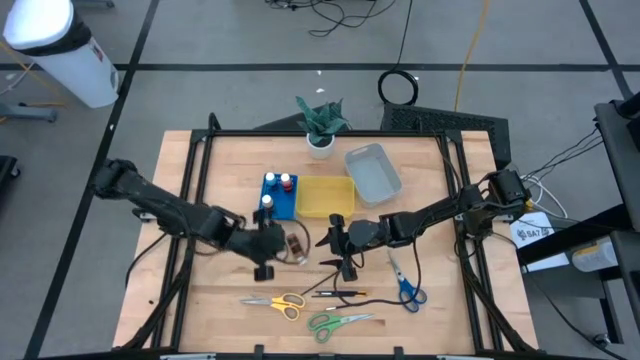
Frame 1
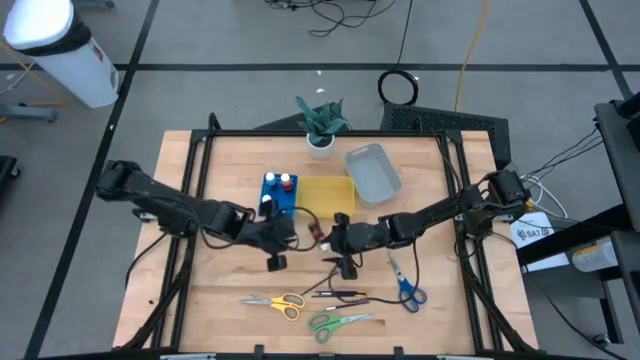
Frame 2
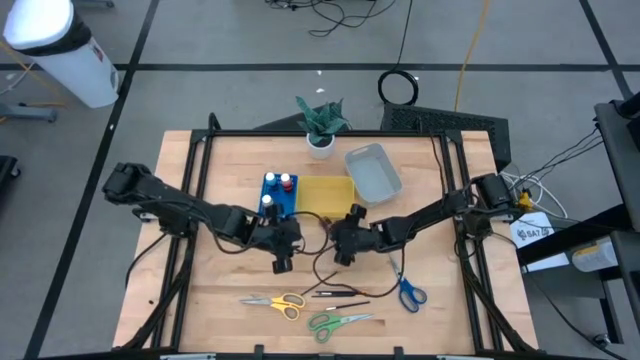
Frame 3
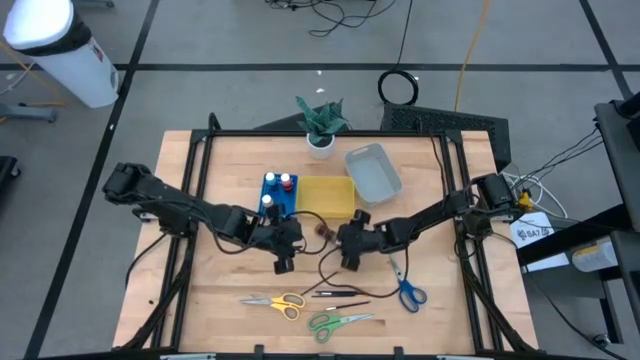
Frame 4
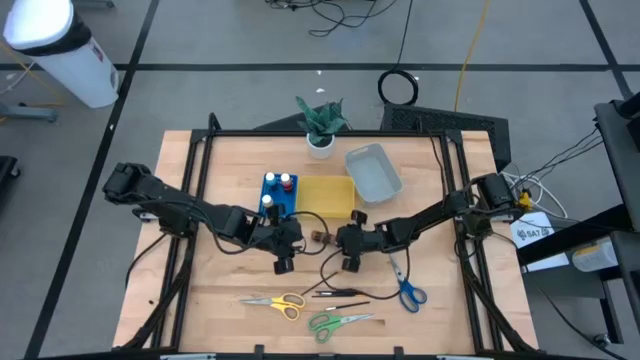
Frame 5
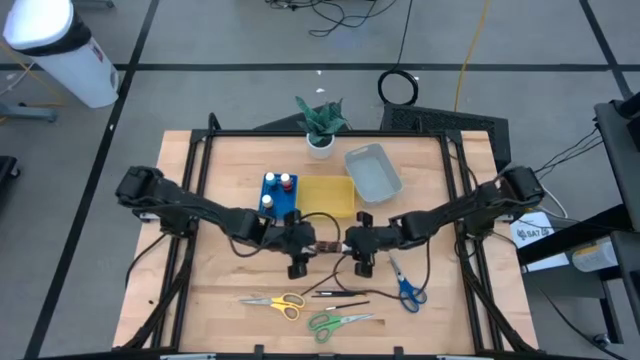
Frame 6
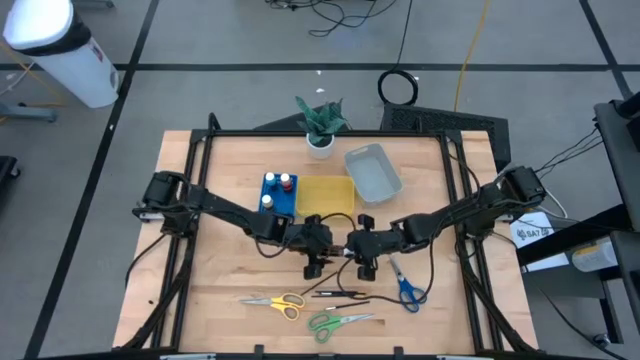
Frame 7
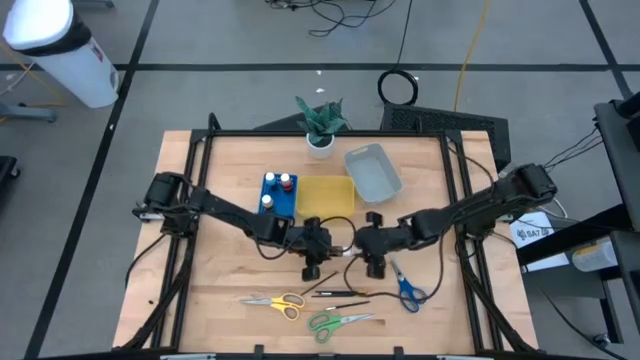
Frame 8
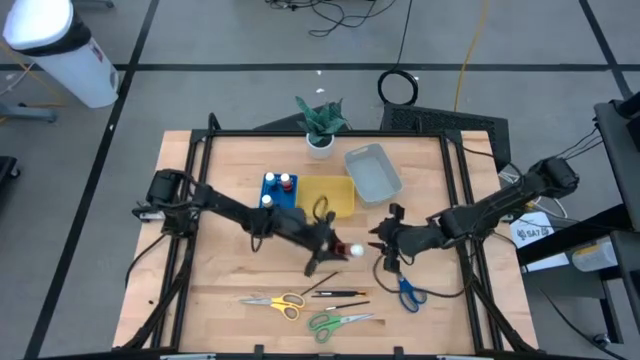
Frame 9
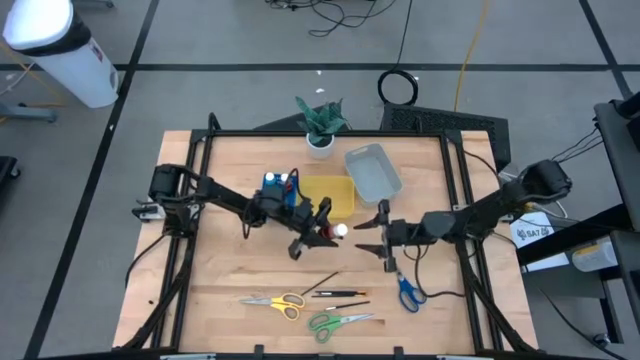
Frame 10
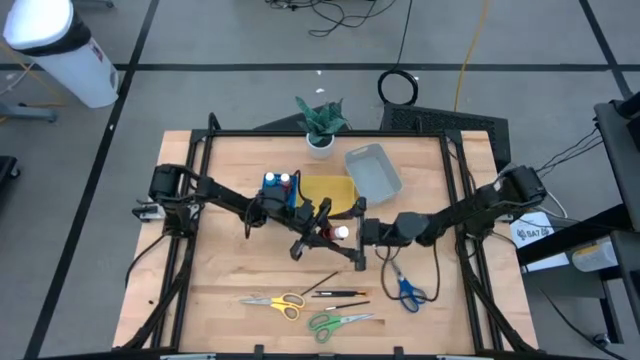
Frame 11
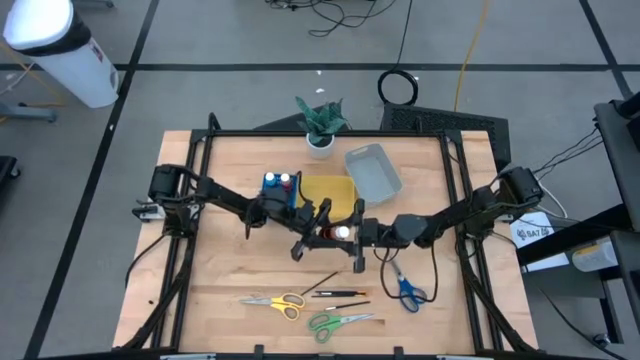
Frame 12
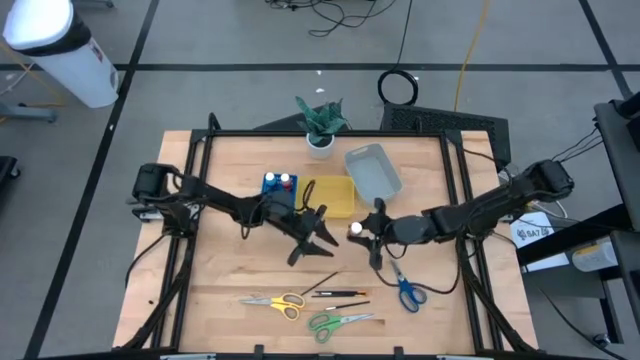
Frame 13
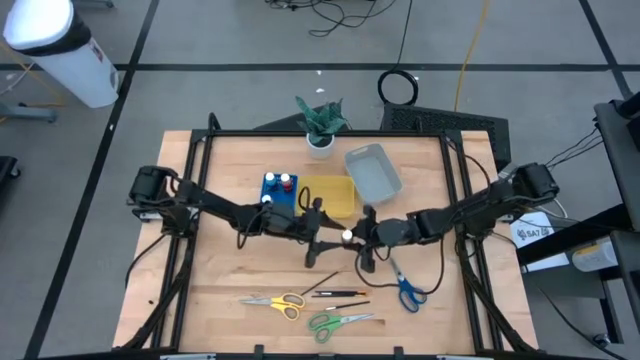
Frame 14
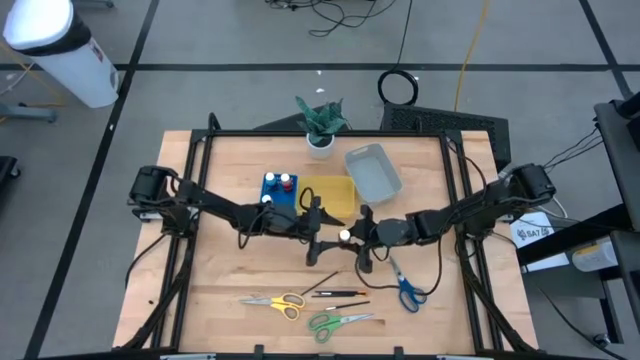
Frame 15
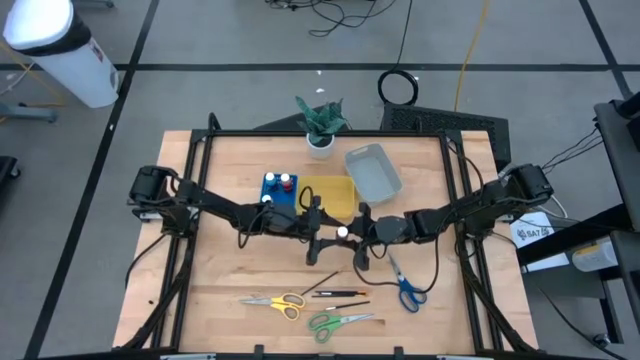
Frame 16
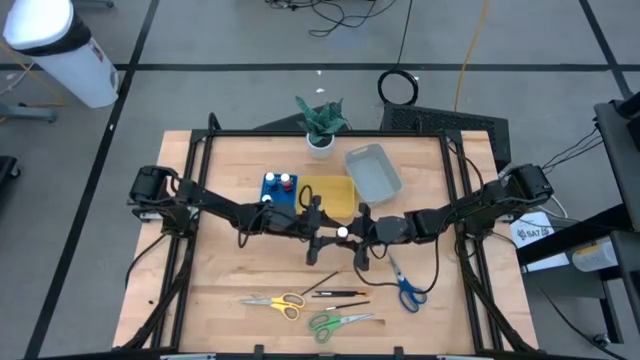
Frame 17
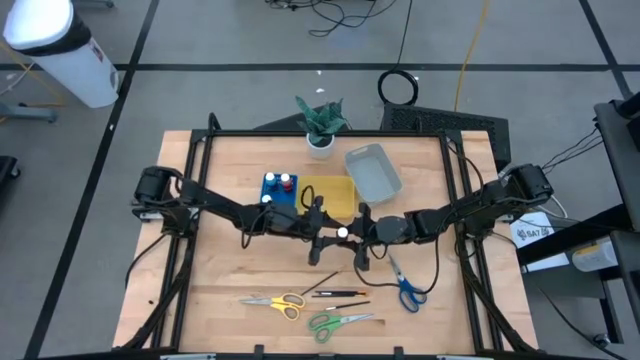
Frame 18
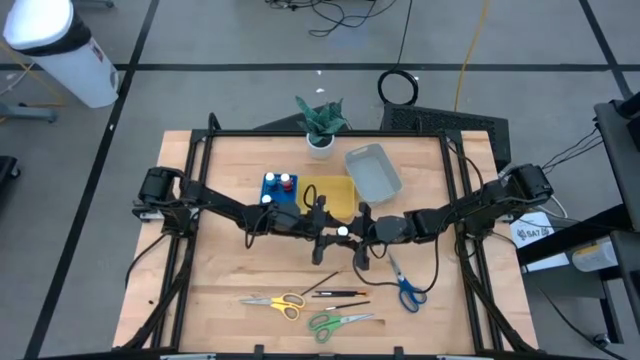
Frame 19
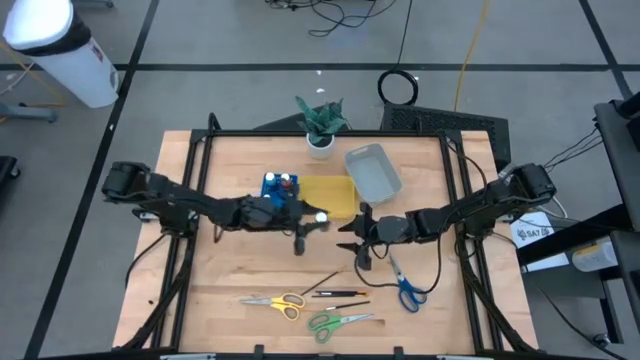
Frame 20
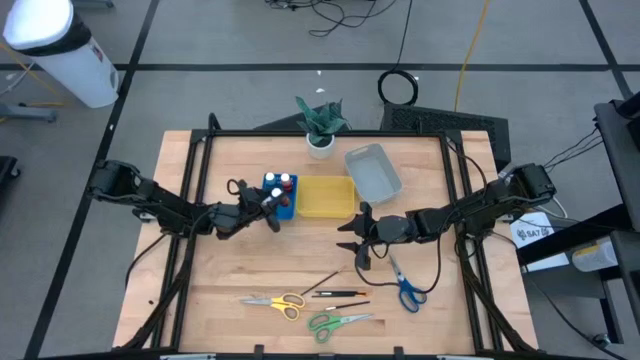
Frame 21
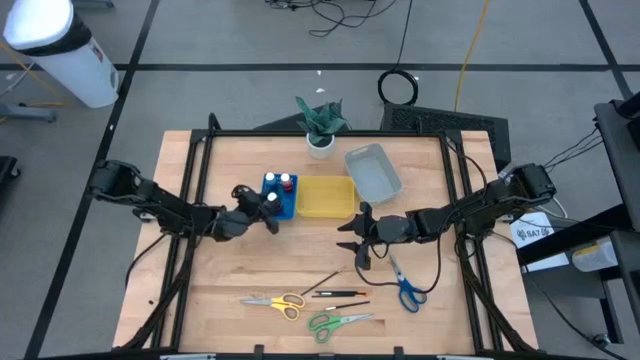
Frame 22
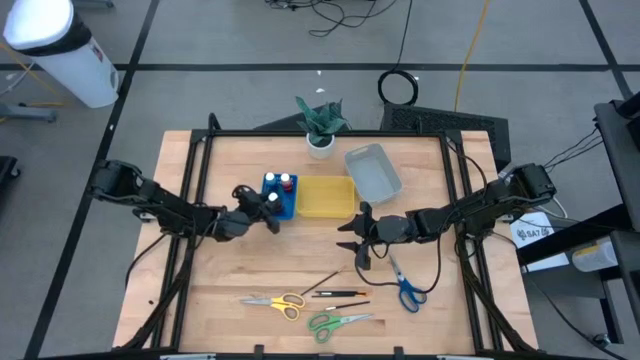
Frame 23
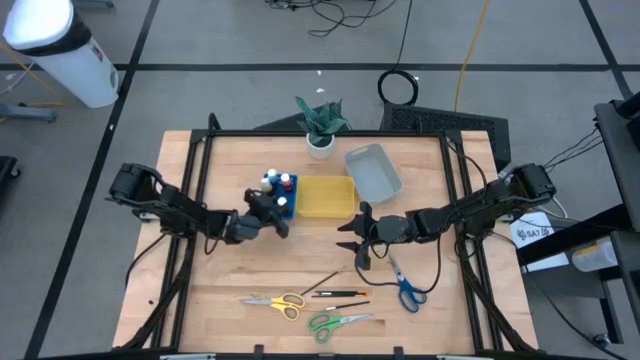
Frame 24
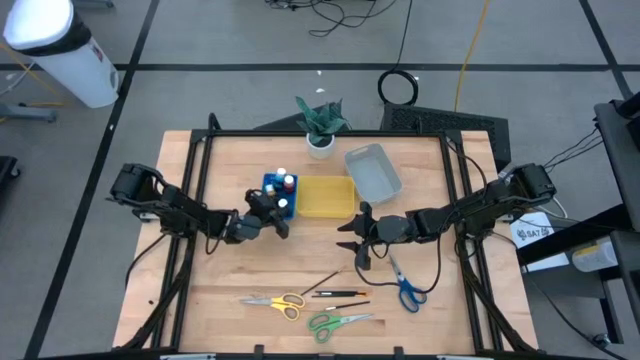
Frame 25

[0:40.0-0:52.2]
Task: Pick & Place Paint Supplies
Put the orange paint bottle into the blue bin

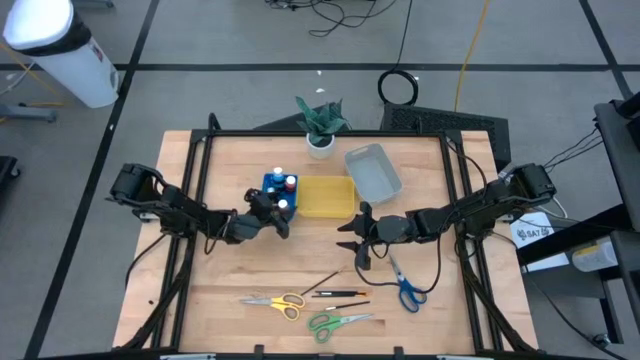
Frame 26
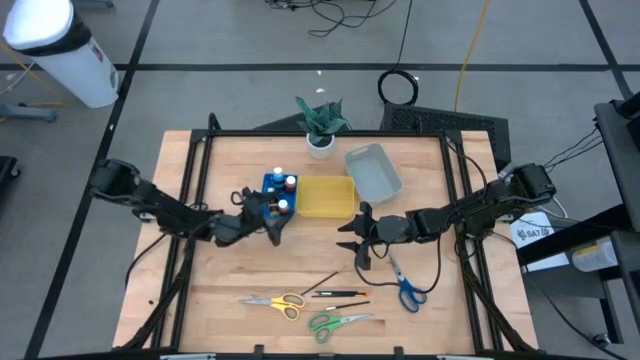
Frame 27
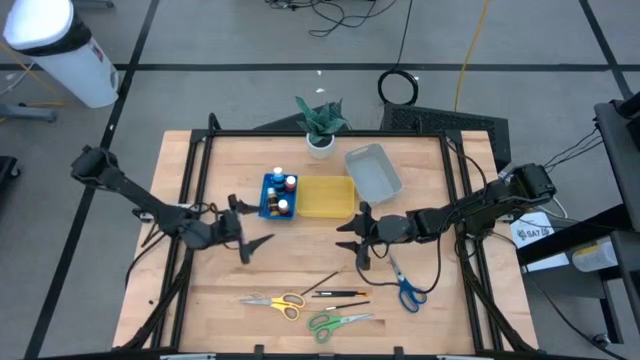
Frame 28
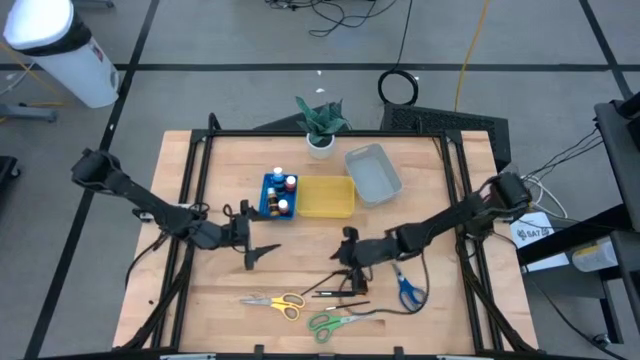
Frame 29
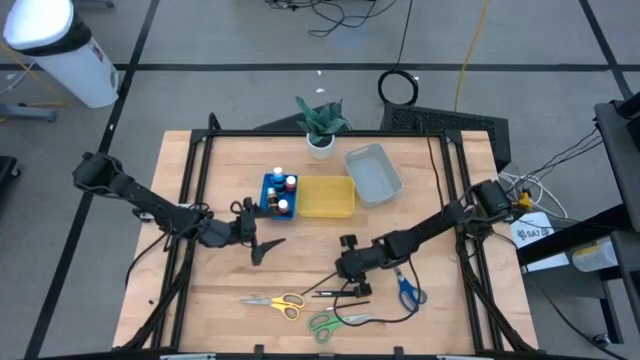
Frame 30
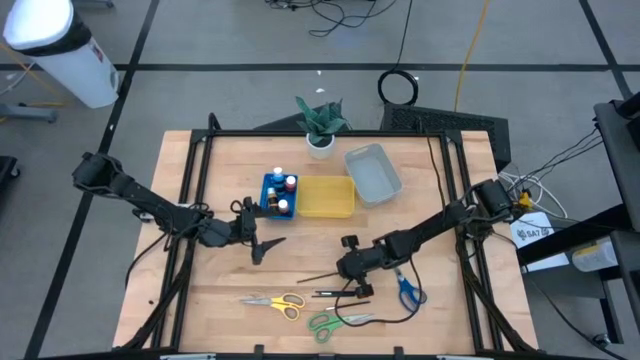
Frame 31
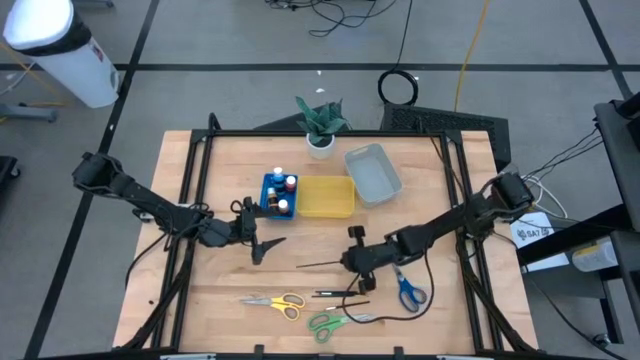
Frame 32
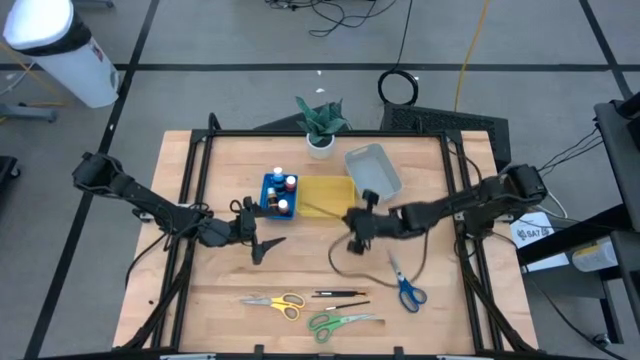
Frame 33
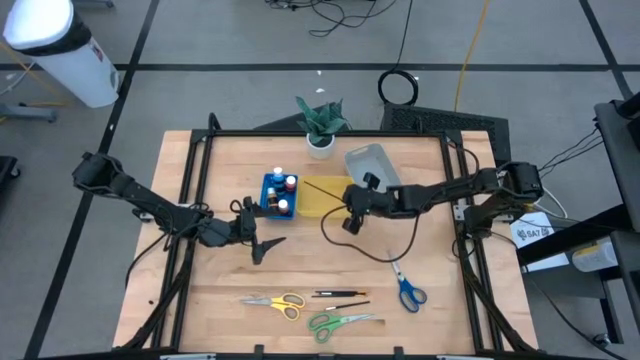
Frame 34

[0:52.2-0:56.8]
Put the top black paint brush into the yellow bin

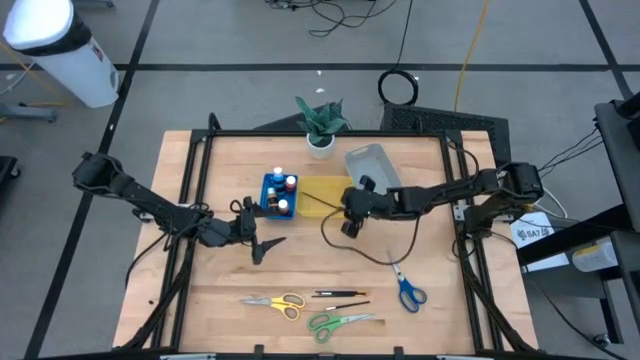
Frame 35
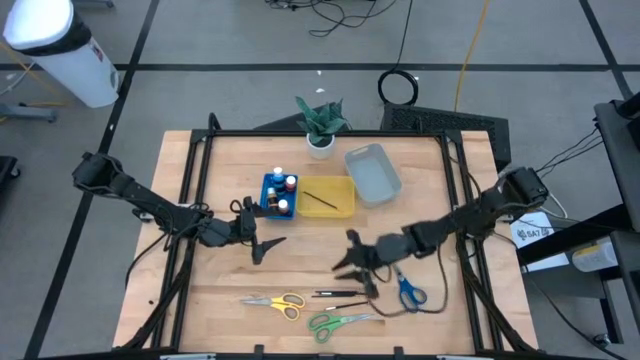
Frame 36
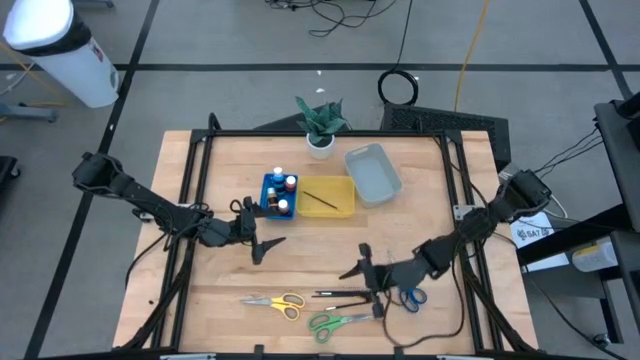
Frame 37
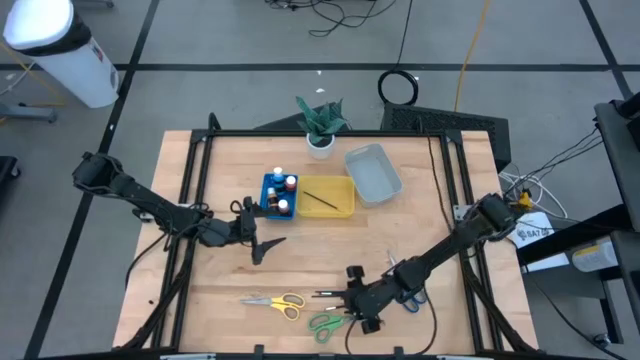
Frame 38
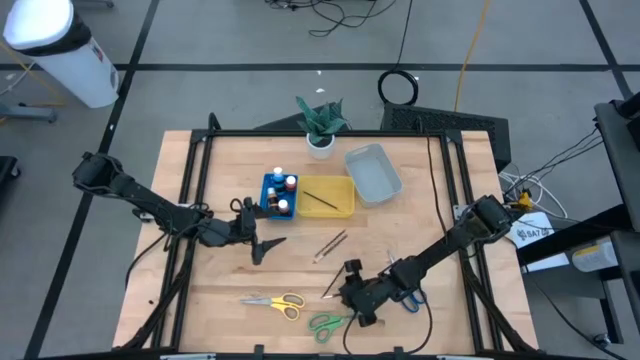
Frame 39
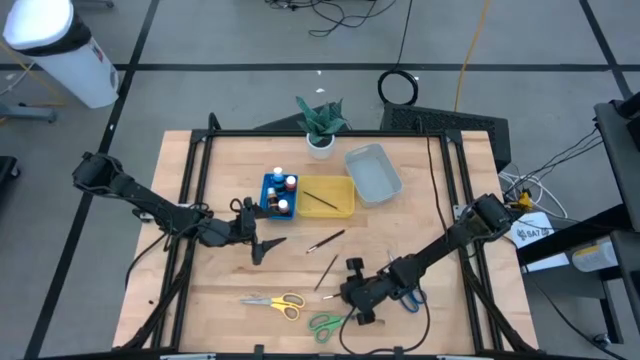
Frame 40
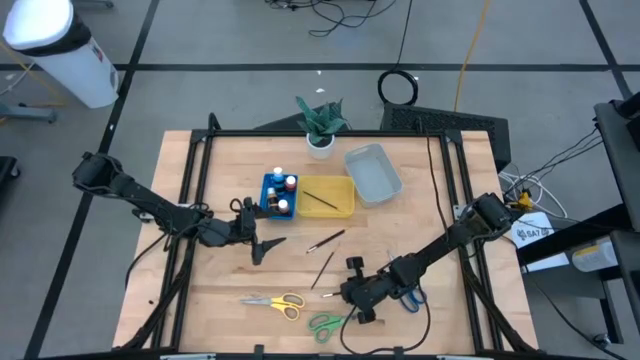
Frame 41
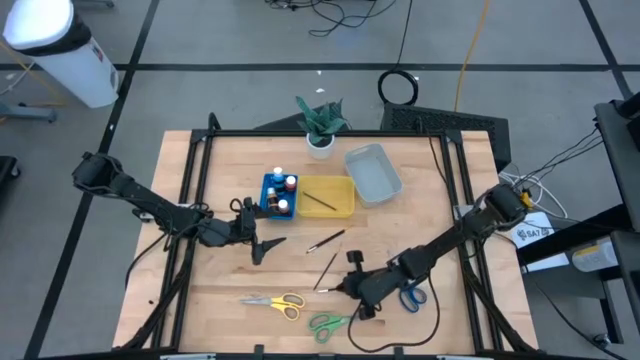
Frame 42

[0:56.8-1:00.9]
Put the black makeup brush into the yellow bin
